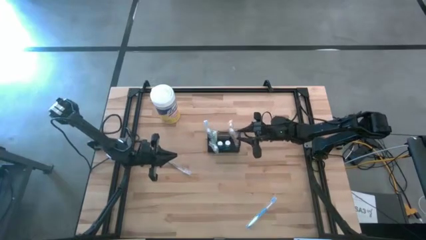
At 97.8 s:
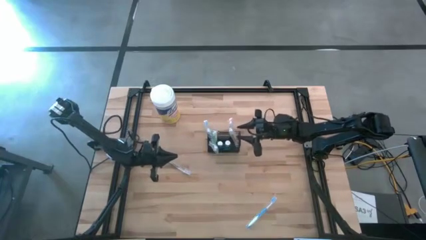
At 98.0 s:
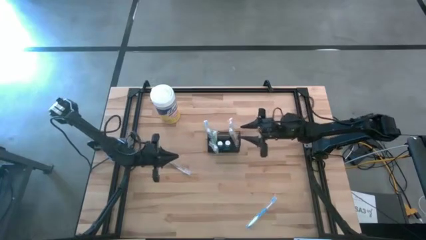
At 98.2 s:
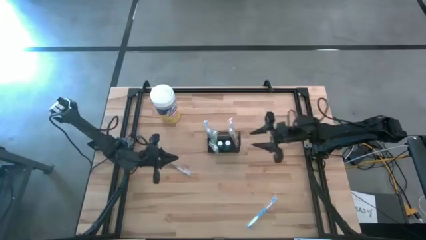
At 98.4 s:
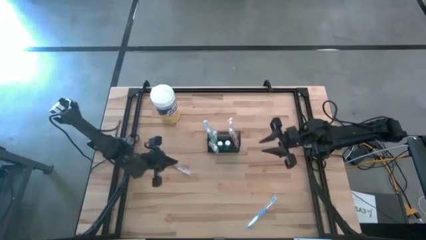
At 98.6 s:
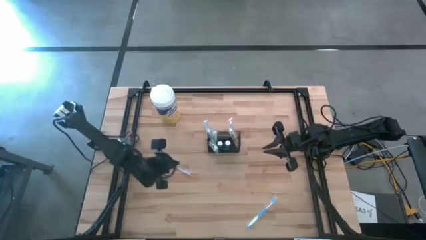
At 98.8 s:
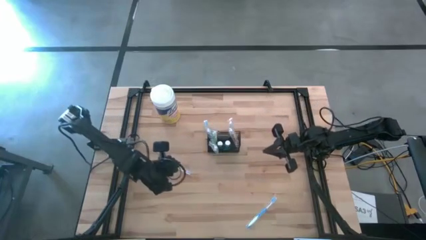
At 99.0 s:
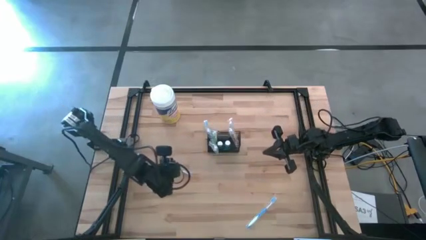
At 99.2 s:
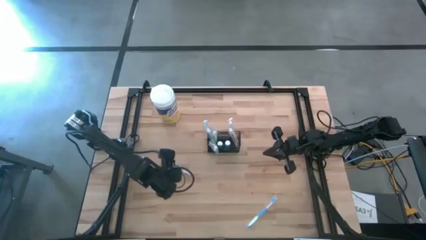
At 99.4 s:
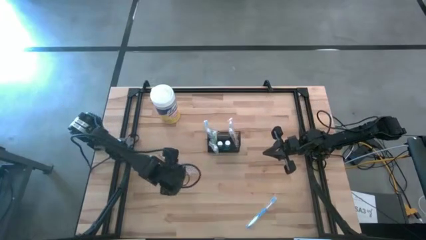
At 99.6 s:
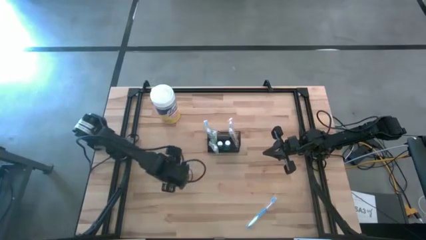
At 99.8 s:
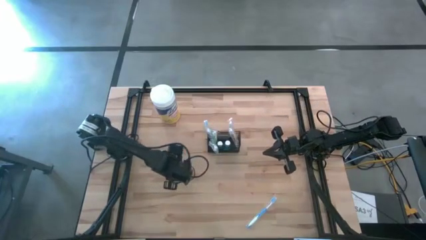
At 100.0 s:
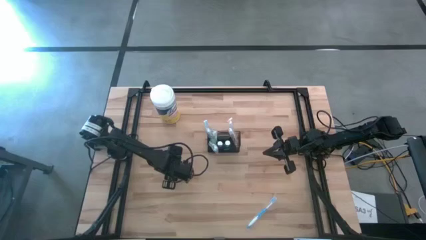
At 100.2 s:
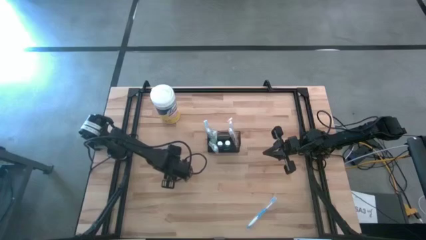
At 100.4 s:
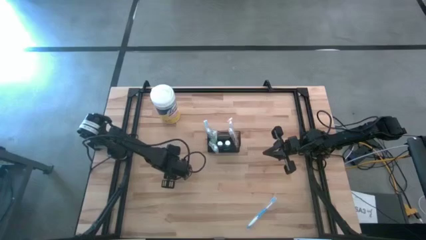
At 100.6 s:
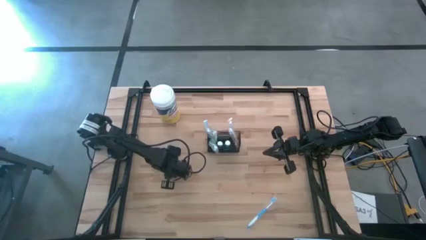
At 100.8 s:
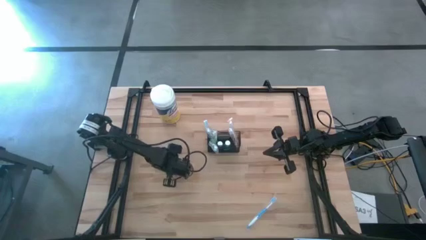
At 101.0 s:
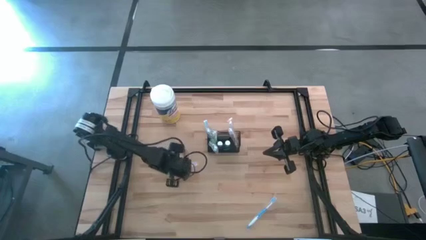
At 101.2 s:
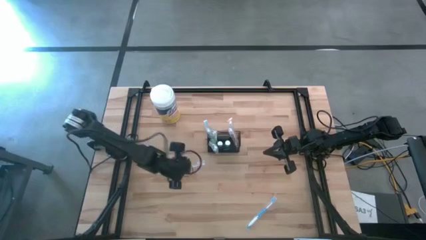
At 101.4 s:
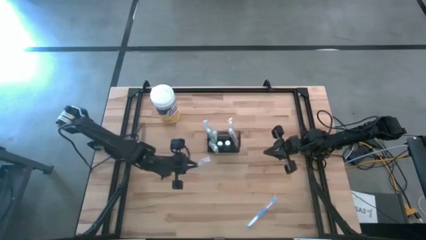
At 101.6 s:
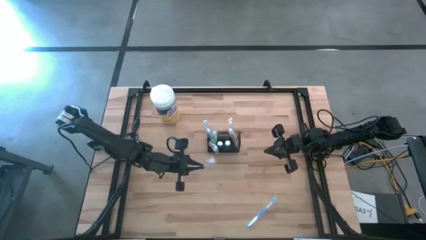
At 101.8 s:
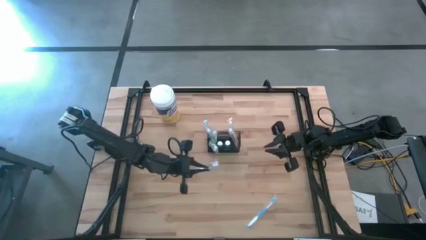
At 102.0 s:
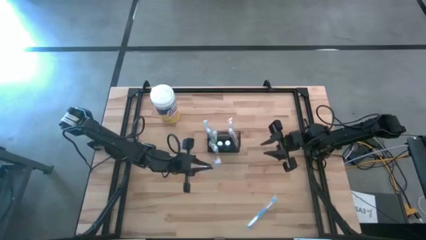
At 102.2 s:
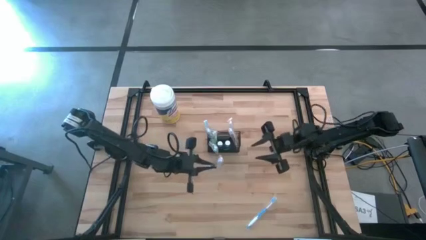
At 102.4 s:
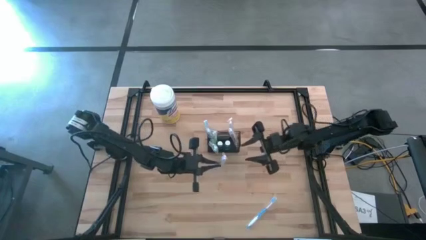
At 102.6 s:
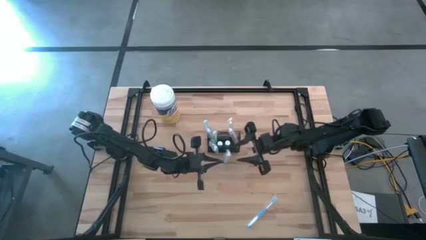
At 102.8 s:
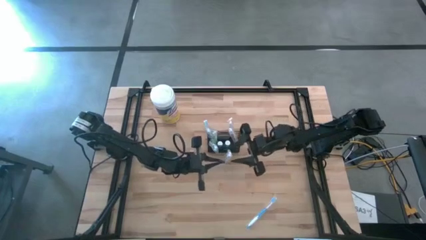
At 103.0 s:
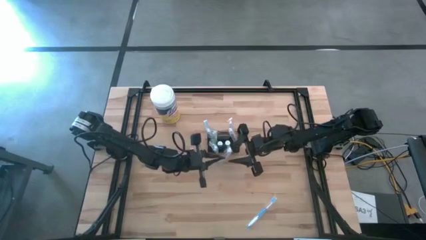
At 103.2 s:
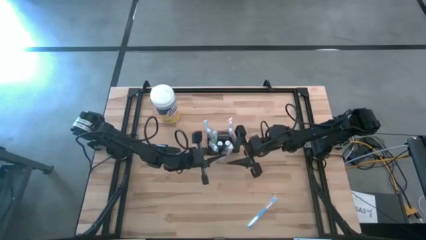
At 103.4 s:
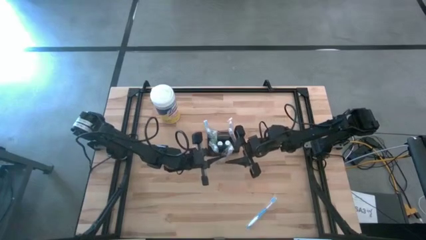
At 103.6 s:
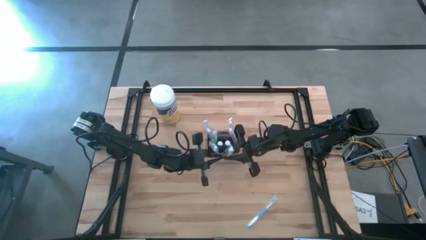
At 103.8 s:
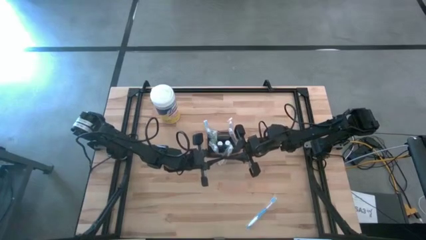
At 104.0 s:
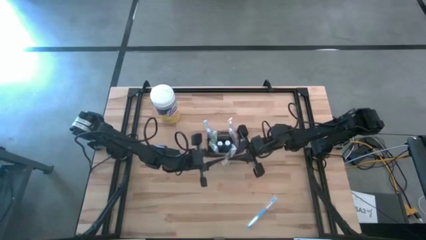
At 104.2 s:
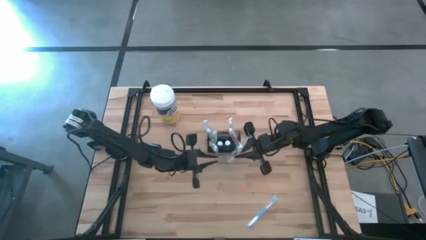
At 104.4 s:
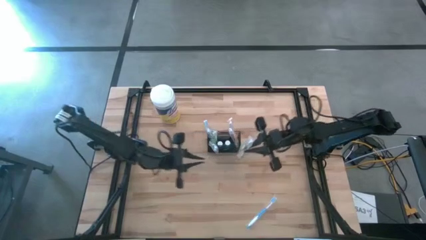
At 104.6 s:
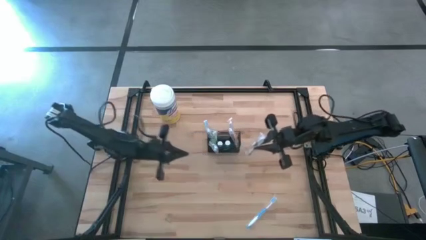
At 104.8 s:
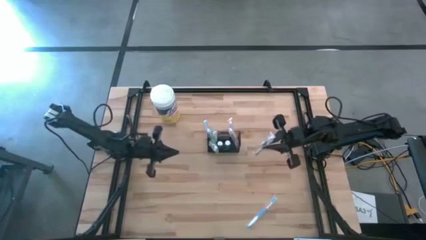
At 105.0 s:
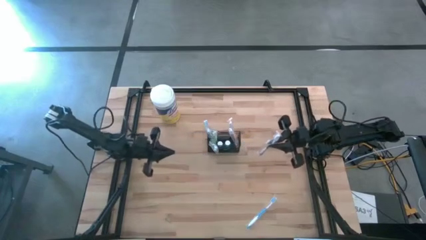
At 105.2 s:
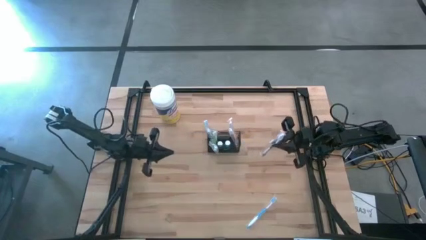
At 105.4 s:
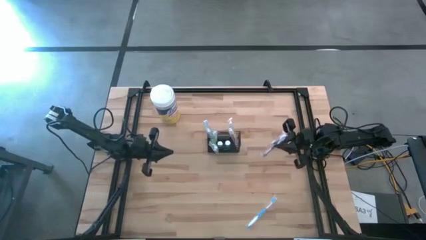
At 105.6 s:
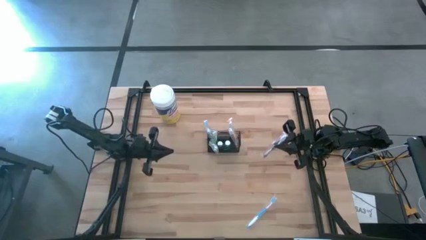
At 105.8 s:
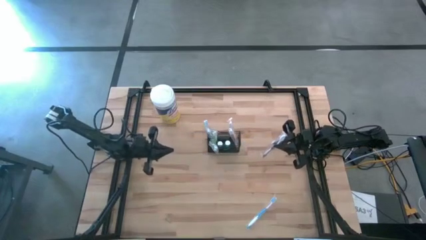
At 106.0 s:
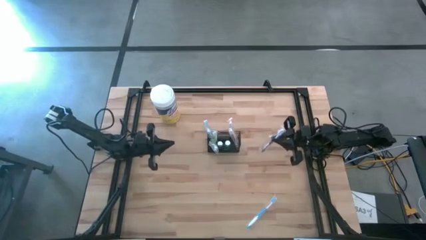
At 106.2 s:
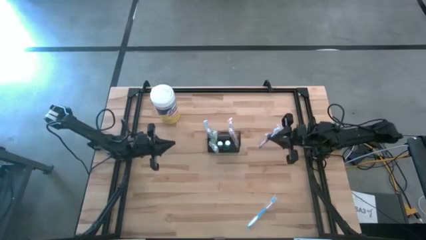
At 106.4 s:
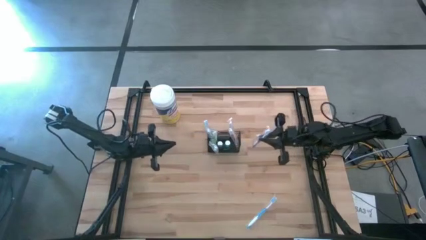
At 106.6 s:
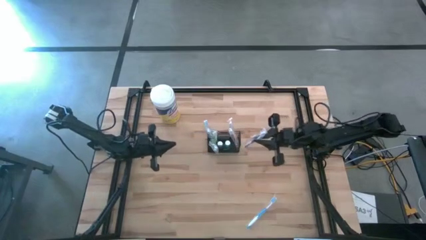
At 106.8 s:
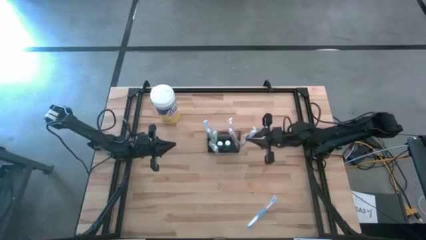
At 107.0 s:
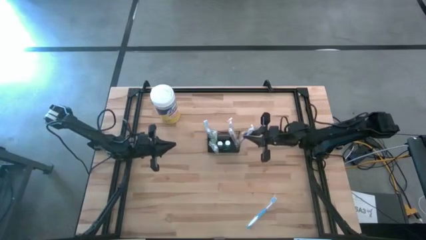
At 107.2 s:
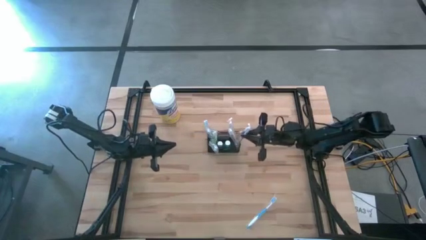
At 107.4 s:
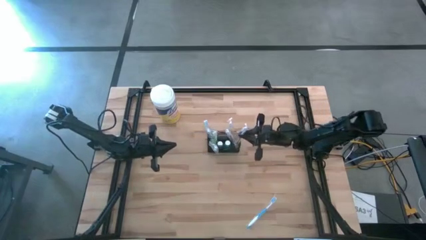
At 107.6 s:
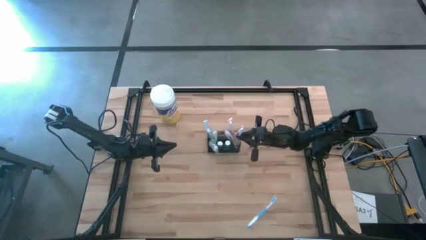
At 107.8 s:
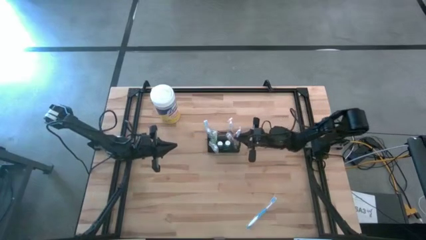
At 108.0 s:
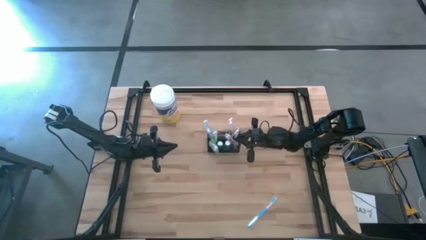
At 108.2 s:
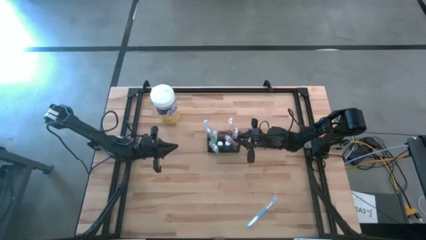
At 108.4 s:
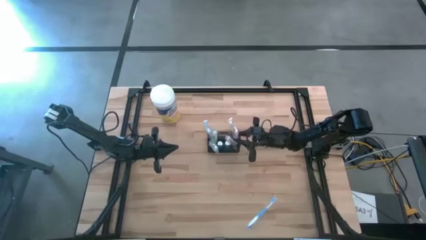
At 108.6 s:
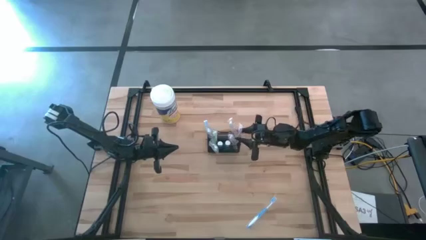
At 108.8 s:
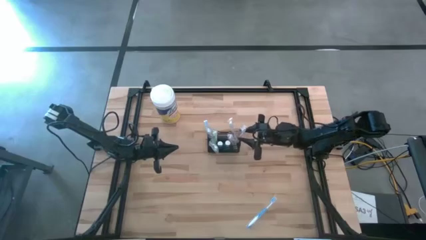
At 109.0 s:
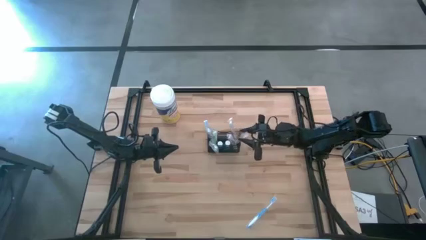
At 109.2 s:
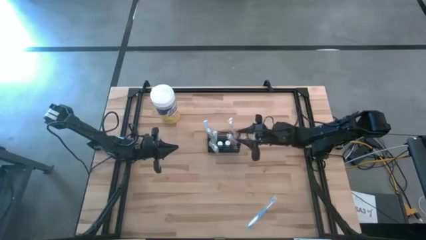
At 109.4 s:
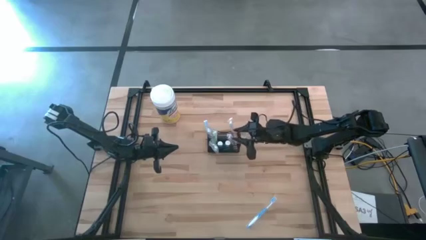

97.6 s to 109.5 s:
Task: Pick & Place toothbrushing station
Put the violet toothbrush into the black mesh organizer
